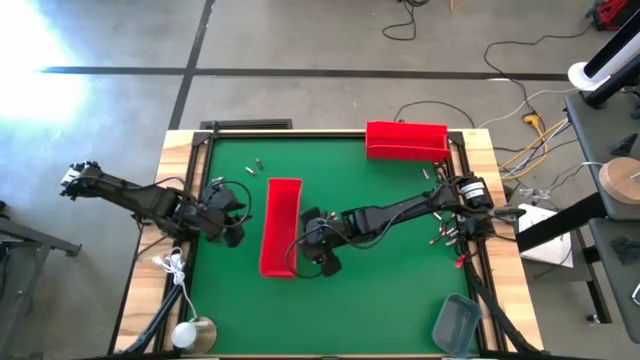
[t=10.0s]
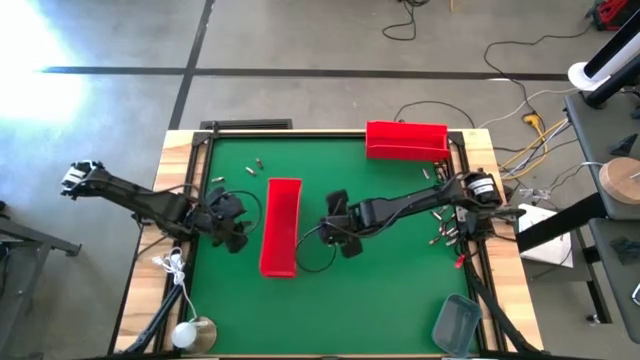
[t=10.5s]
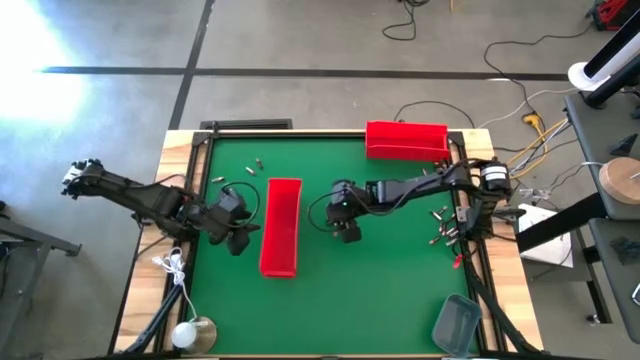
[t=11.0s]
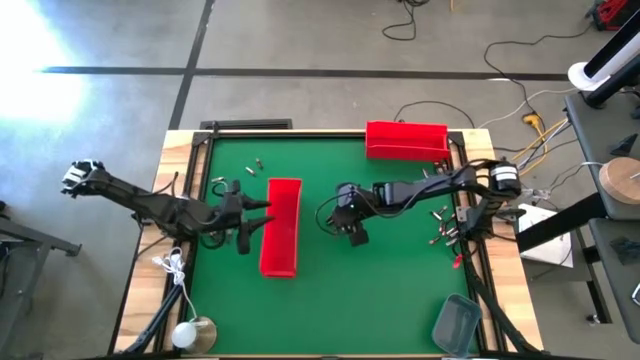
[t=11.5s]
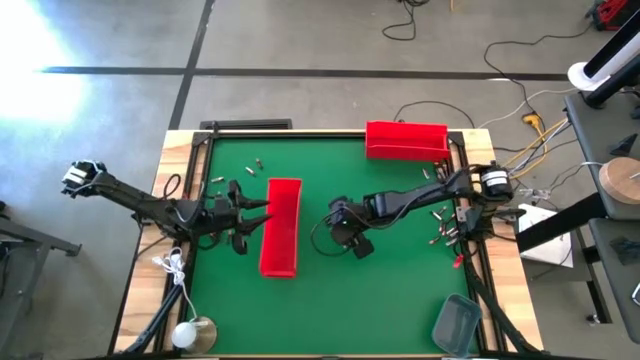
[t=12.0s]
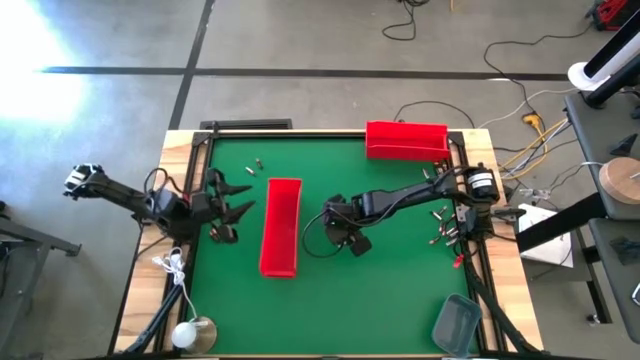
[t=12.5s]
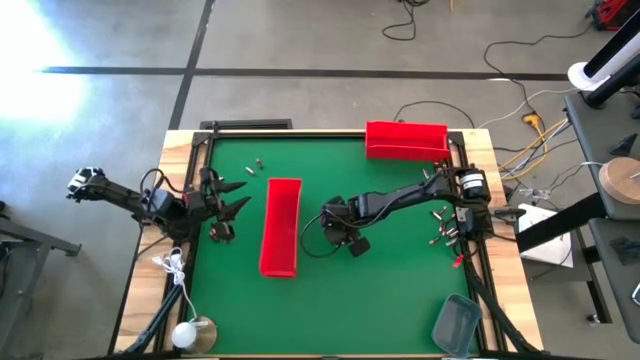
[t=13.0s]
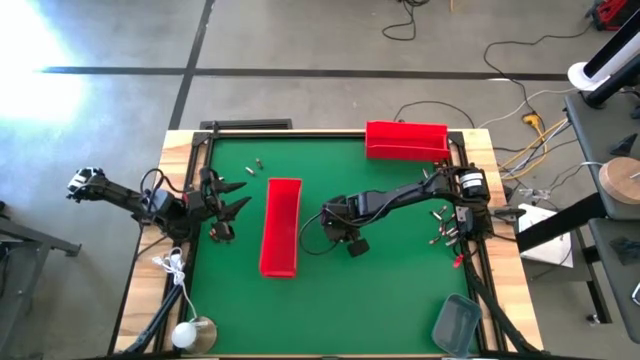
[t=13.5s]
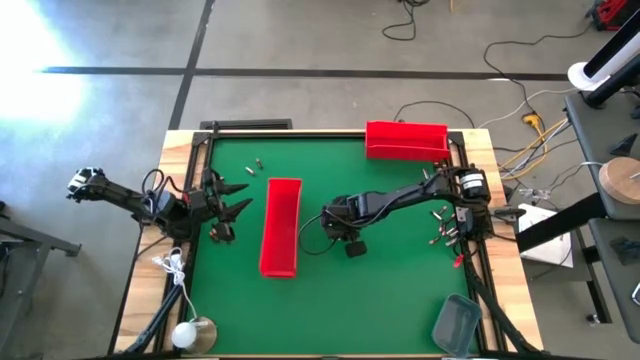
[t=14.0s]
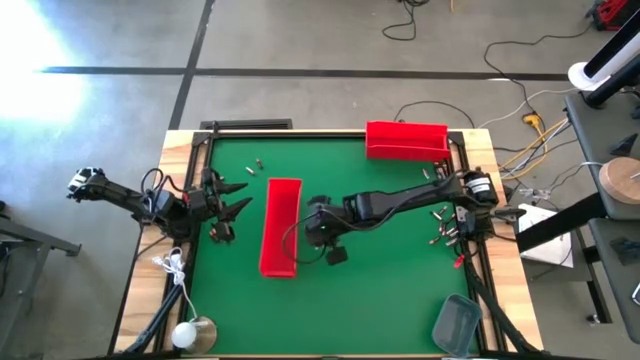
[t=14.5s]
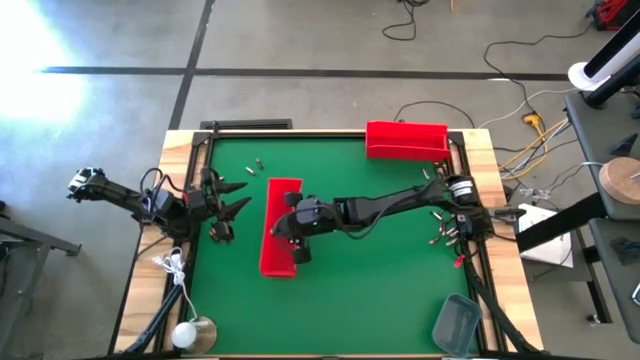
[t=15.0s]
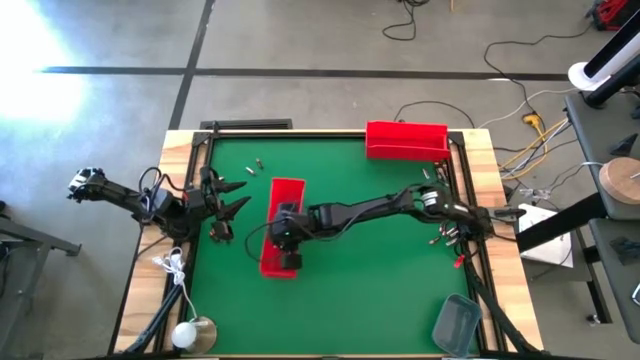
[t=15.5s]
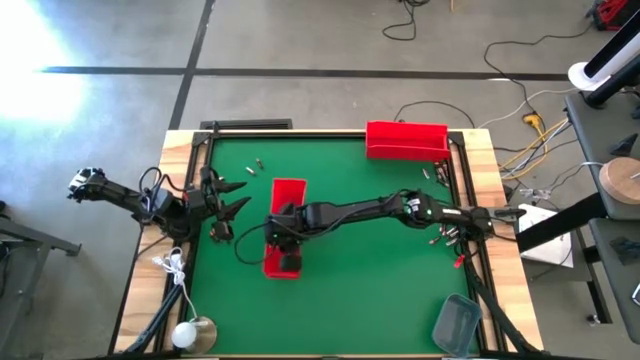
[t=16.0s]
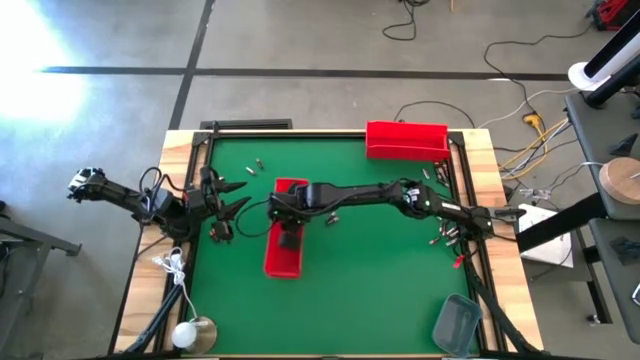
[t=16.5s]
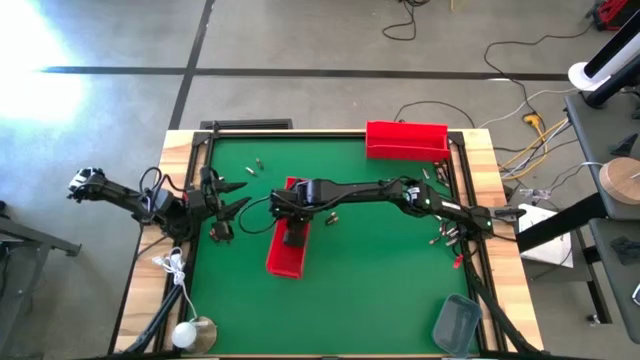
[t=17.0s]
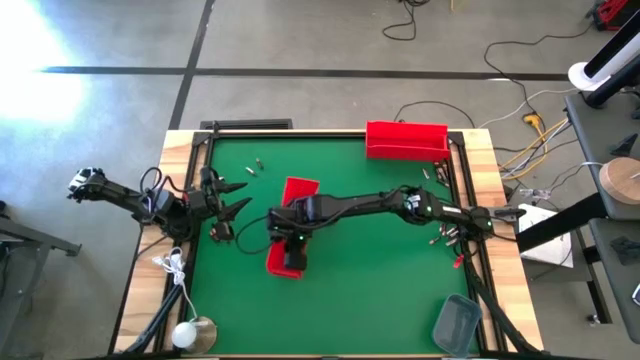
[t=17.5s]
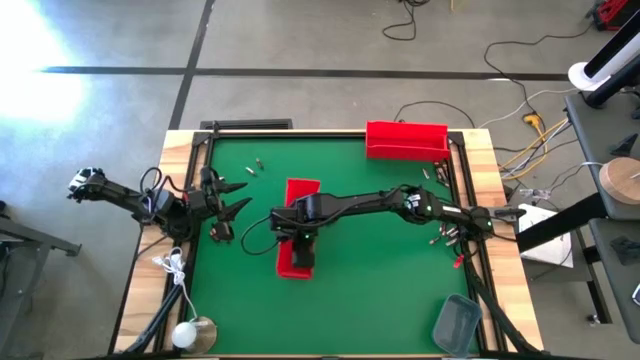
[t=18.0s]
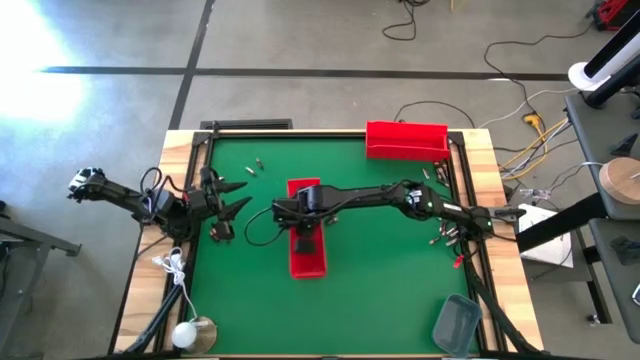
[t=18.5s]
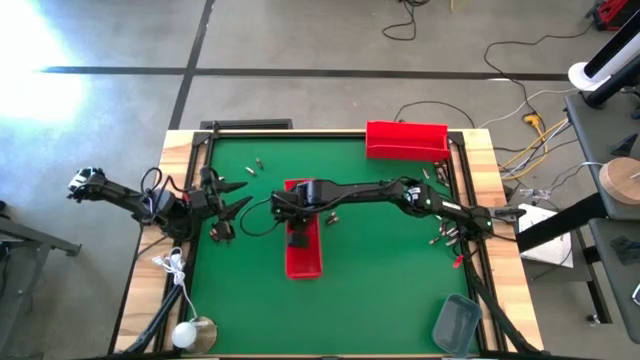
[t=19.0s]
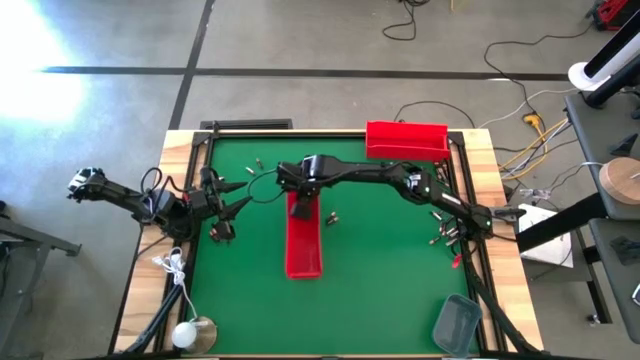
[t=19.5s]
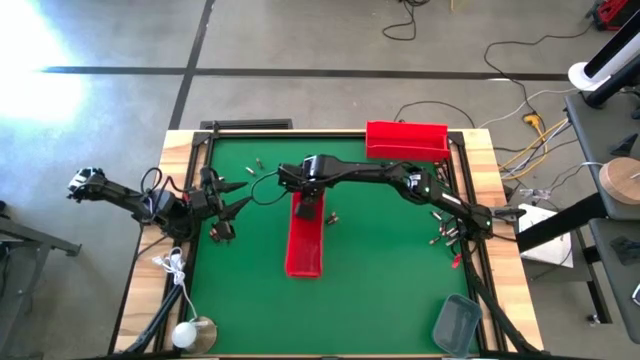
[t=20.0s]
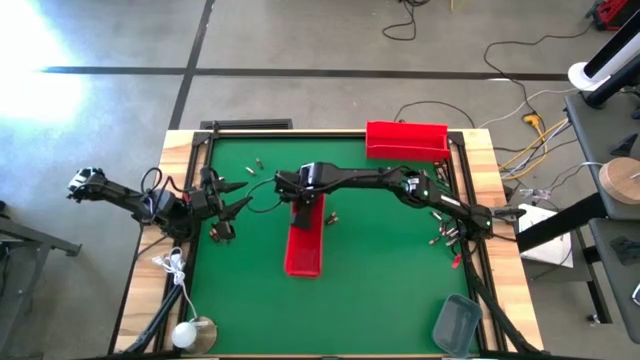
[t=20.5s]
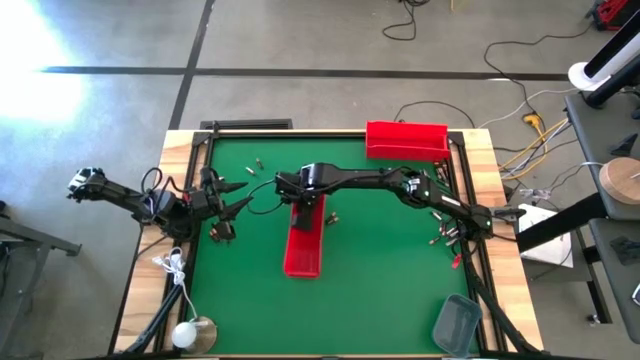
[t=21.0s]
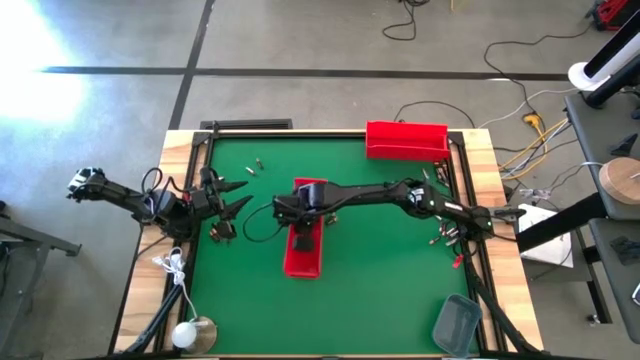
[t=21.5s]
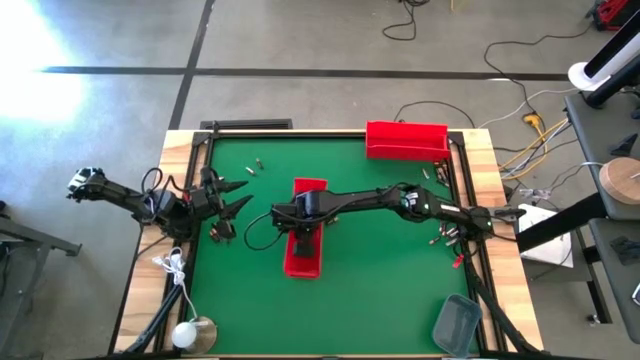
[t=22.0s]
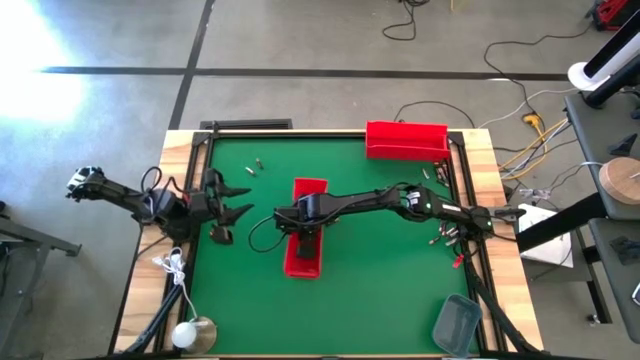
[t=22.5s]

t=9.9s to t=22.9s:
Task: Sort batteries
Put the big black battery into the left red bin

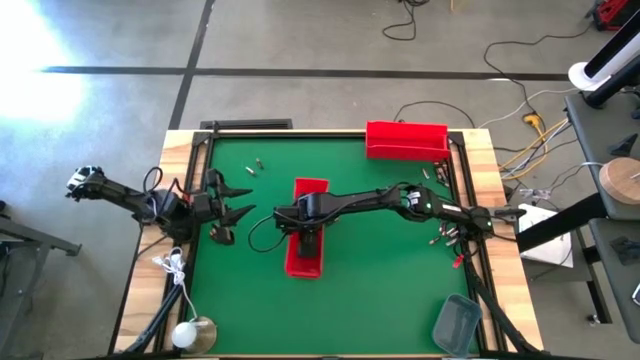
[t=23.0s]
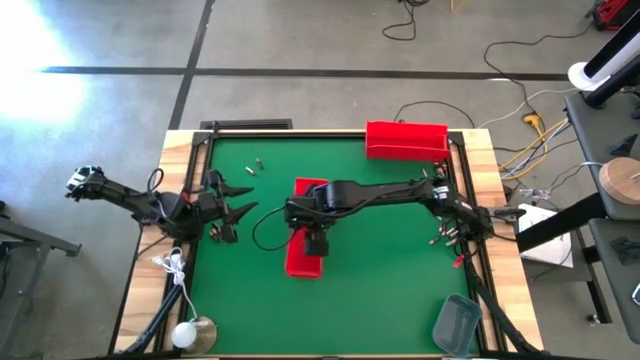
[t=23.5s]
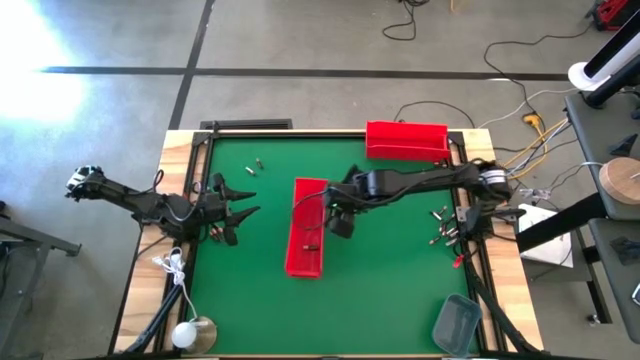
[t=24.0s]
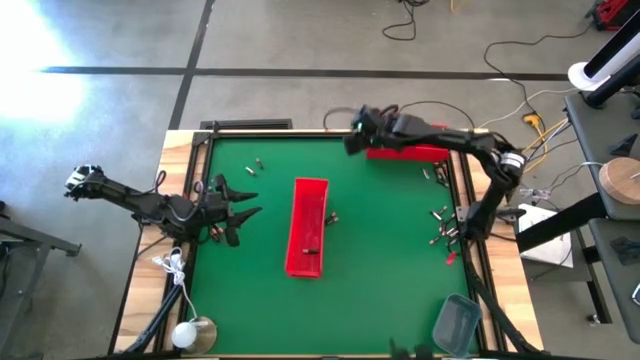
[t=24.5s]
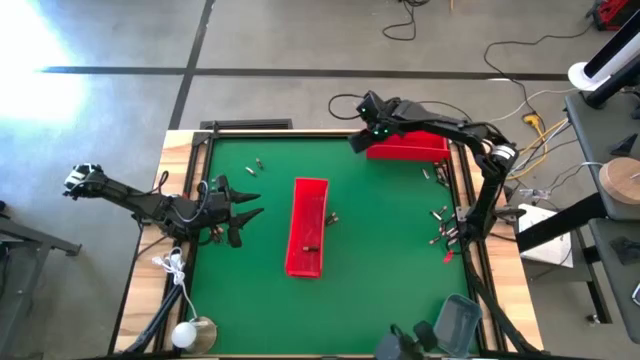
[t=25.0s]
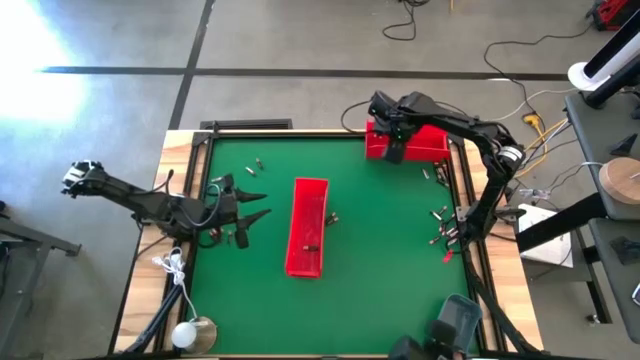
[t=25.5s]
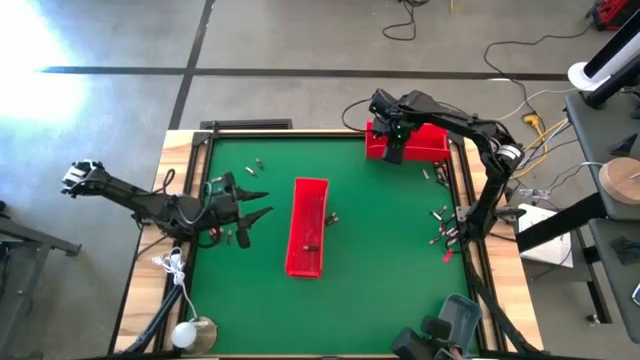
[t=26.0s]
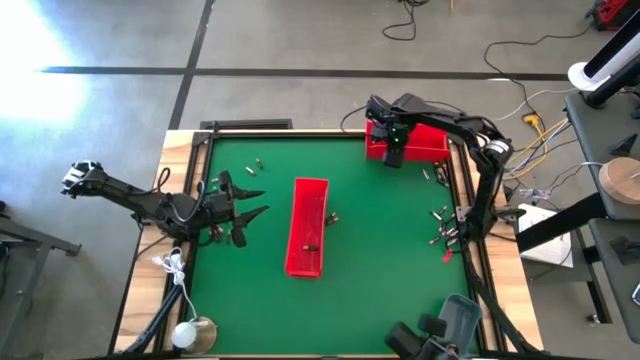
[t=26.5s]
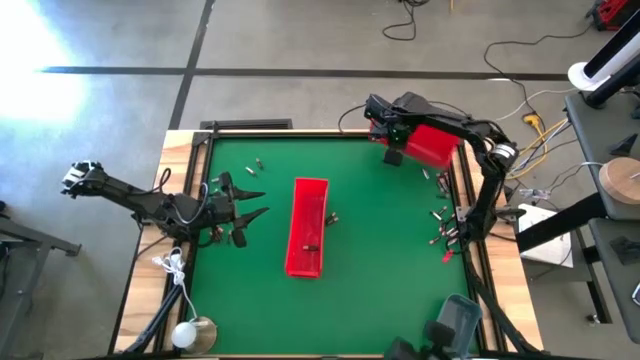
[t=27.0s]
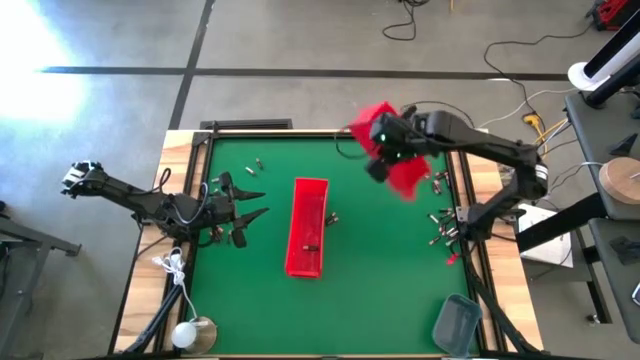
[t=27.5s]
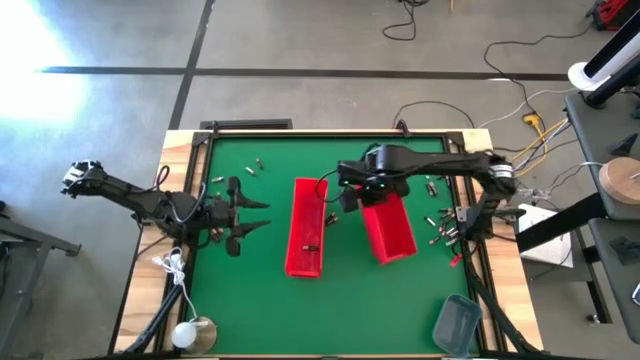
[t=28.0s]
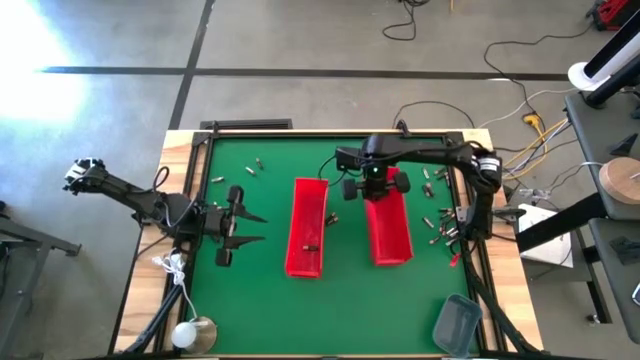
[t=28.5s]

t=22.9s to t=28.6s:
Move the right red bin to the middle of the table

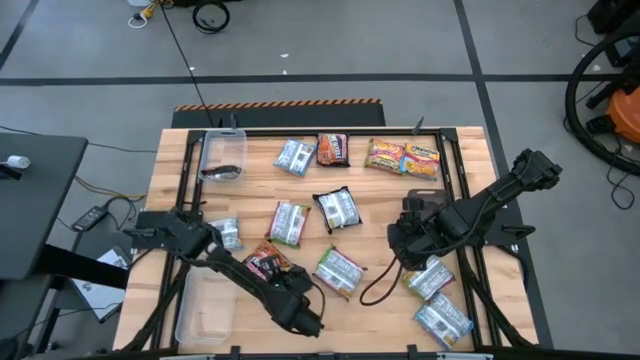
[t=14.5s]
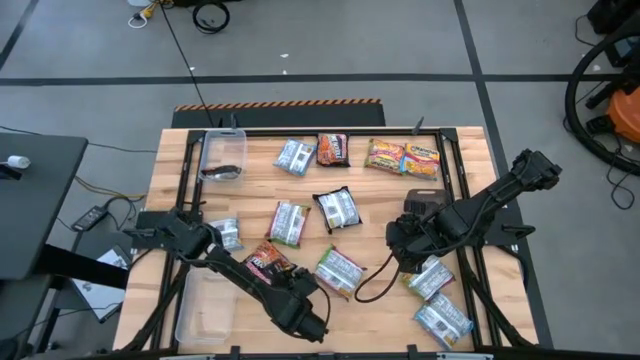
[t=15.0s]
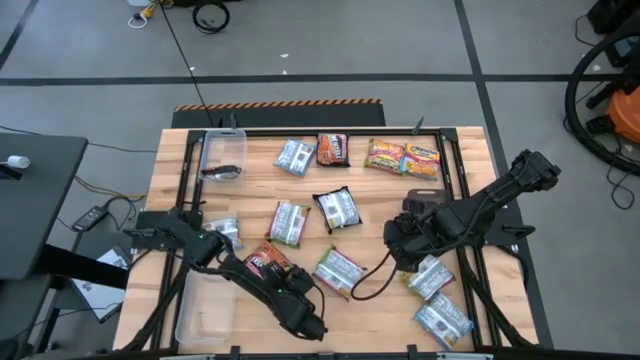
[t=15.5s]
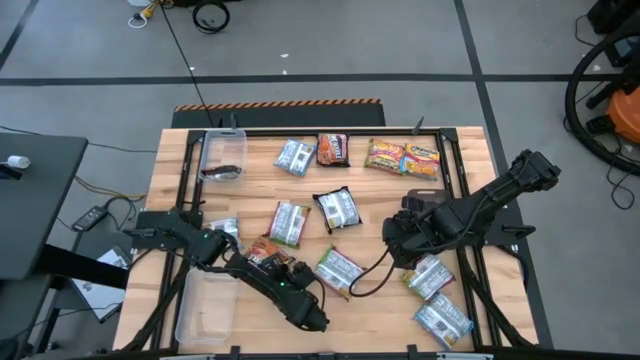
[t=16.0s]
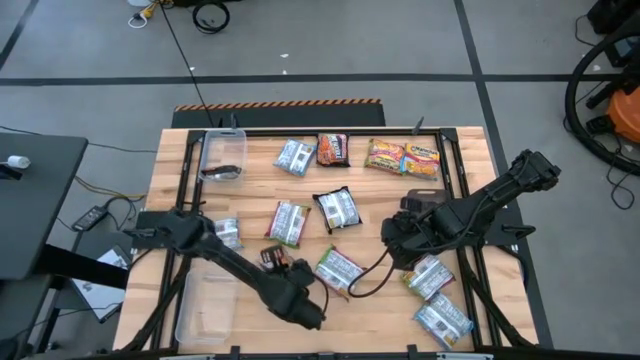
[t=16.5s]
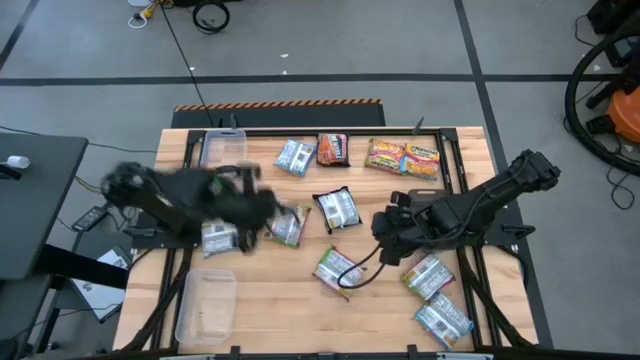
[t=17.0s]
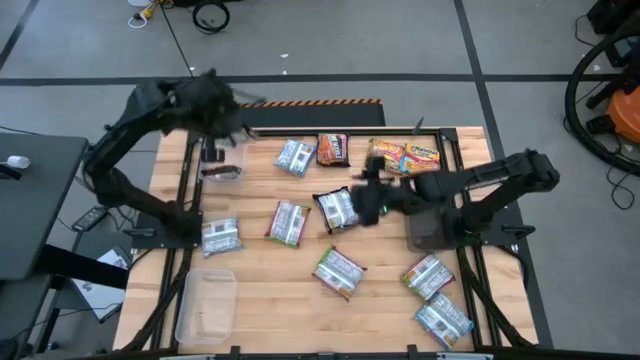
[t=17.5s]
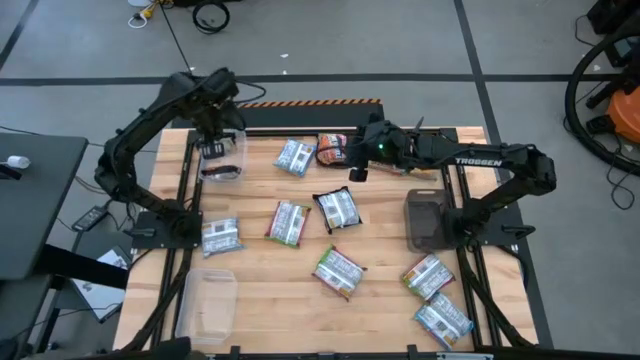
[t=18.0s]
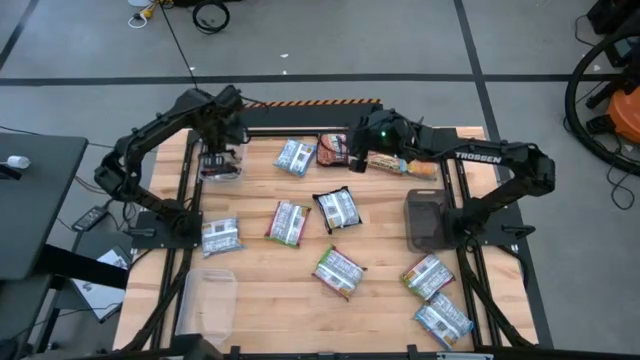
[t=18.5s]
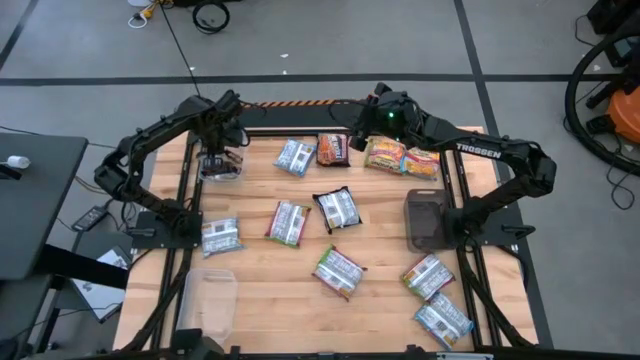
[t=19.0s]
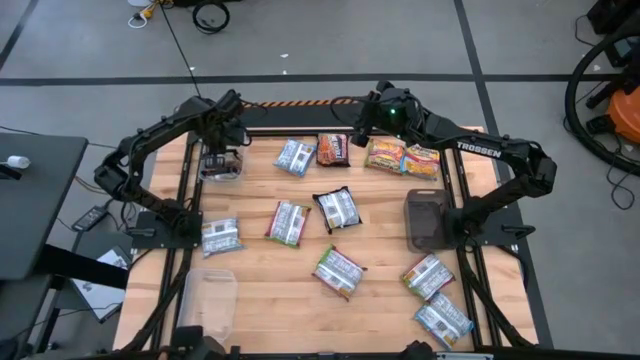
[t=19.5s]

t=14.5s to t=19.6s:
Task: Sort Maruchan noodles
Put the black noodle pack into the top transparent bin
